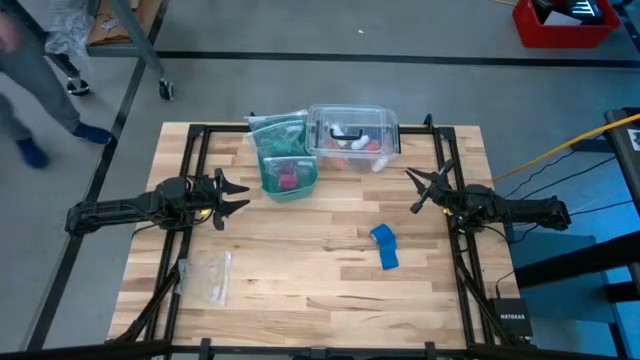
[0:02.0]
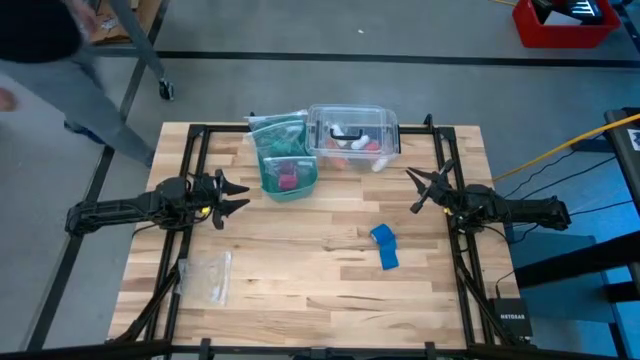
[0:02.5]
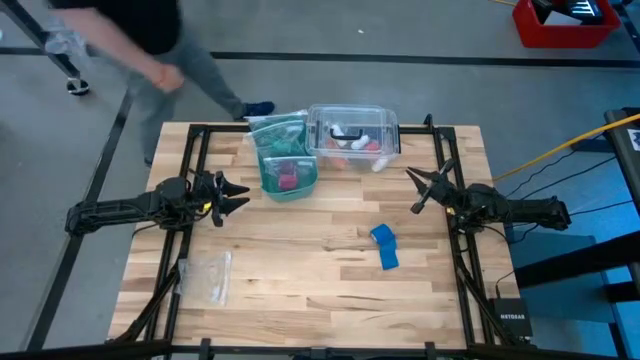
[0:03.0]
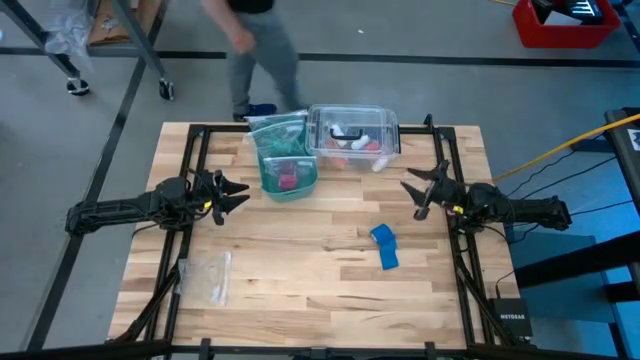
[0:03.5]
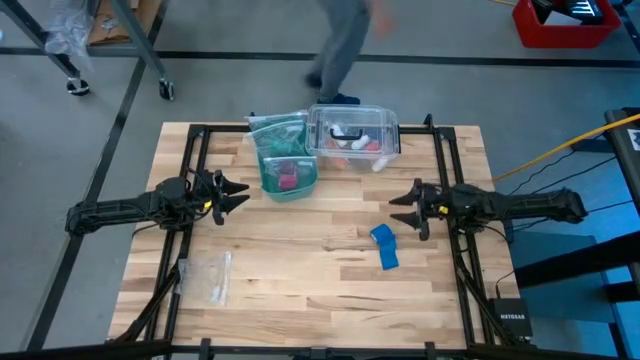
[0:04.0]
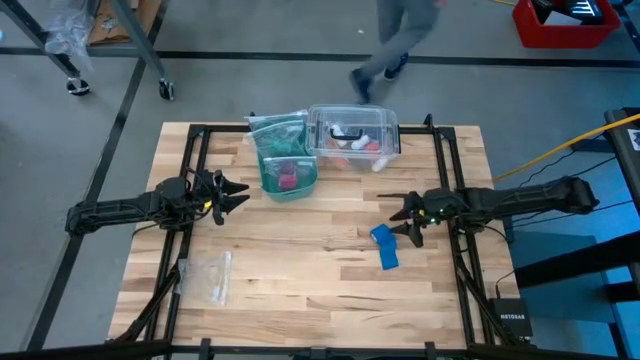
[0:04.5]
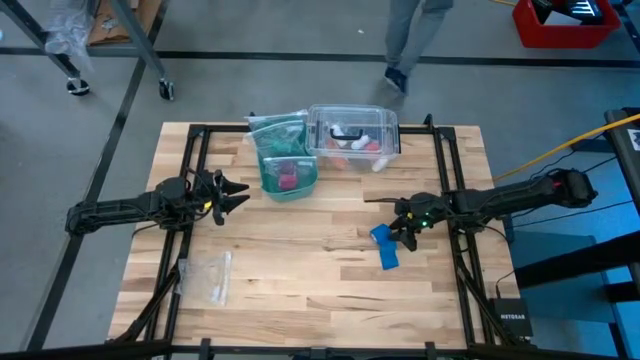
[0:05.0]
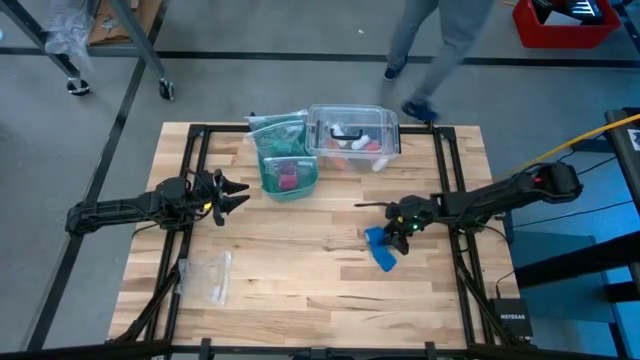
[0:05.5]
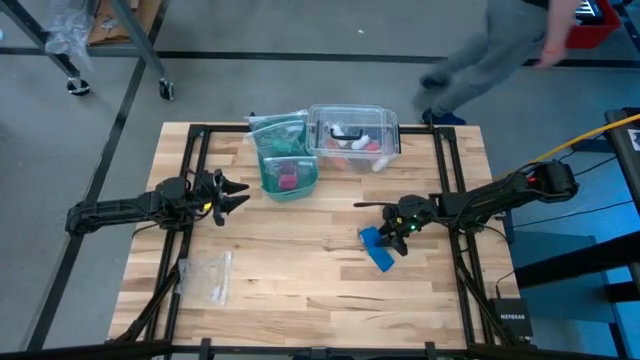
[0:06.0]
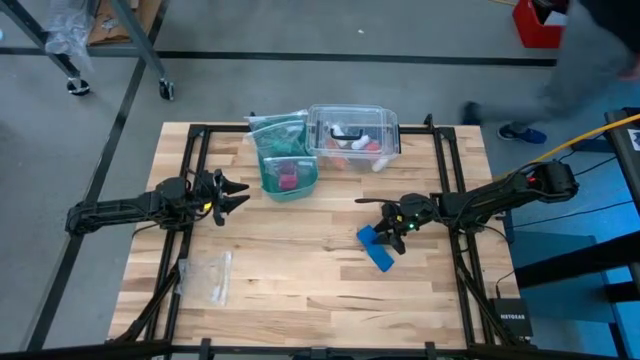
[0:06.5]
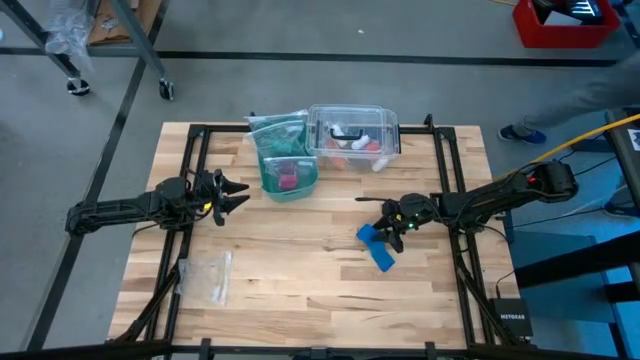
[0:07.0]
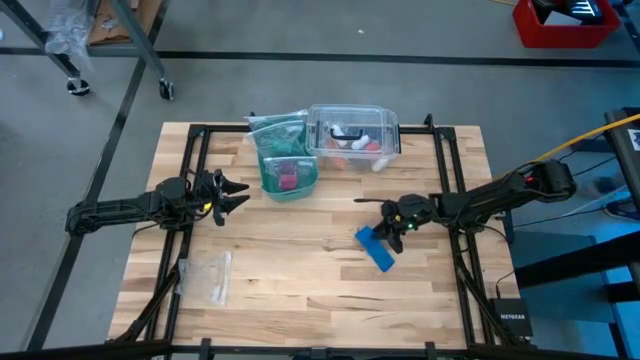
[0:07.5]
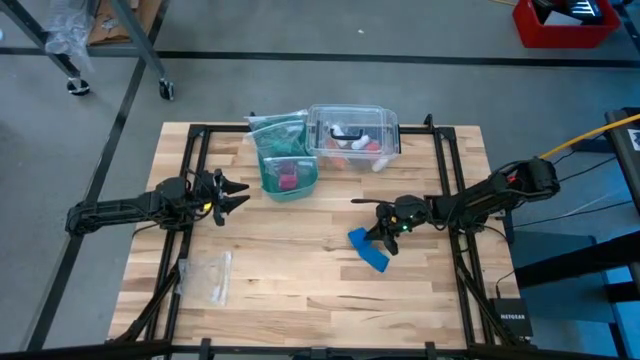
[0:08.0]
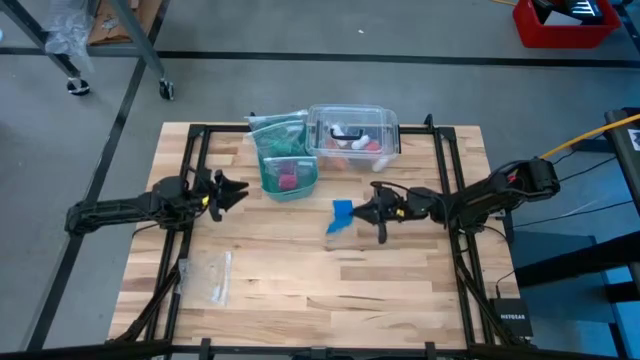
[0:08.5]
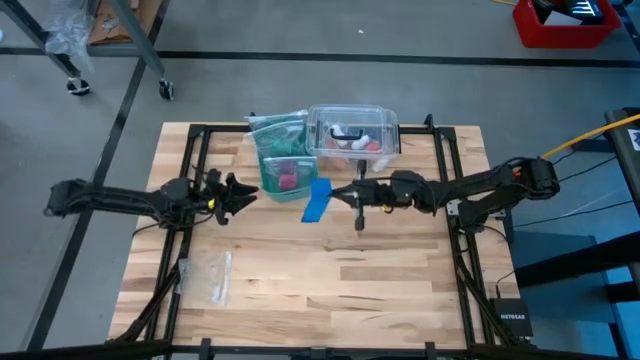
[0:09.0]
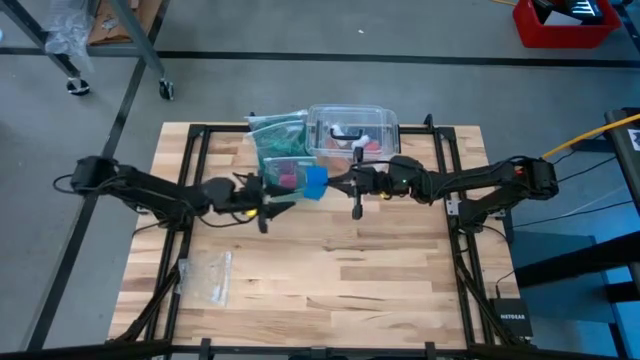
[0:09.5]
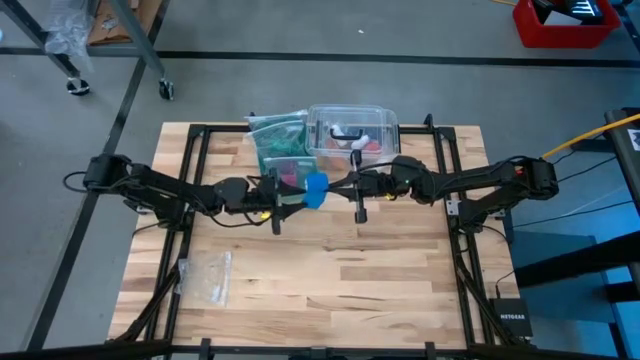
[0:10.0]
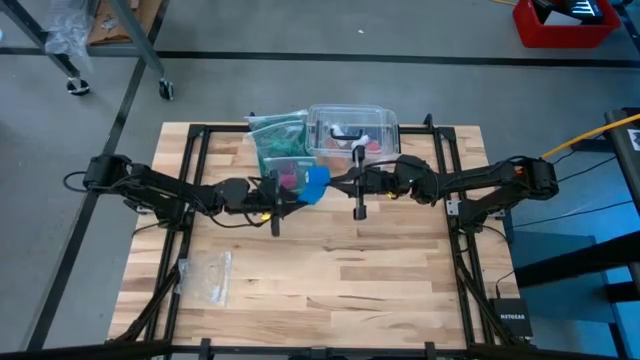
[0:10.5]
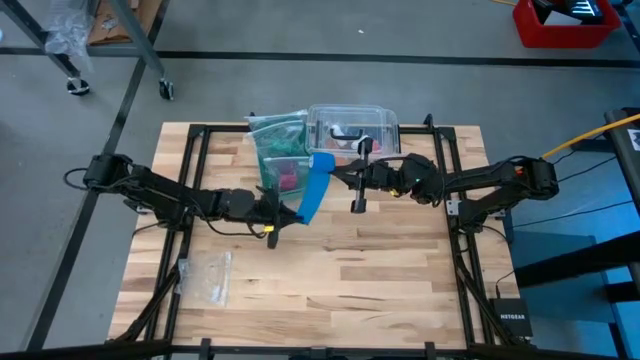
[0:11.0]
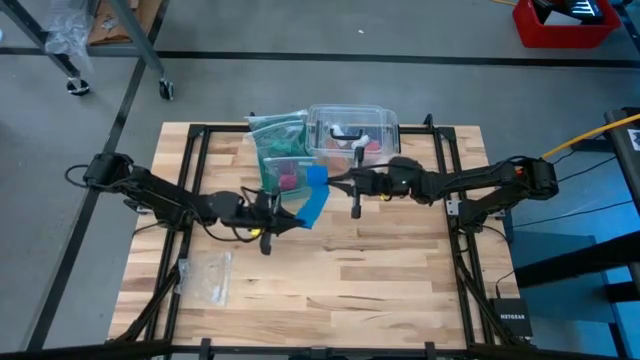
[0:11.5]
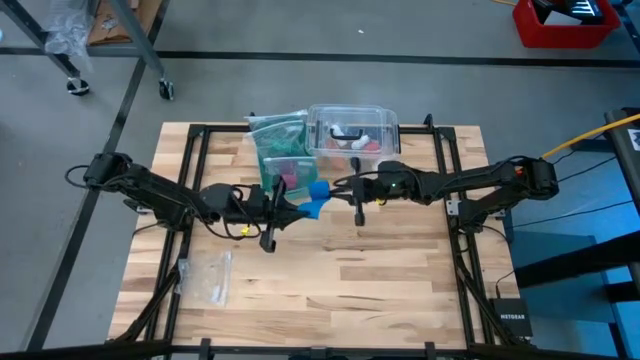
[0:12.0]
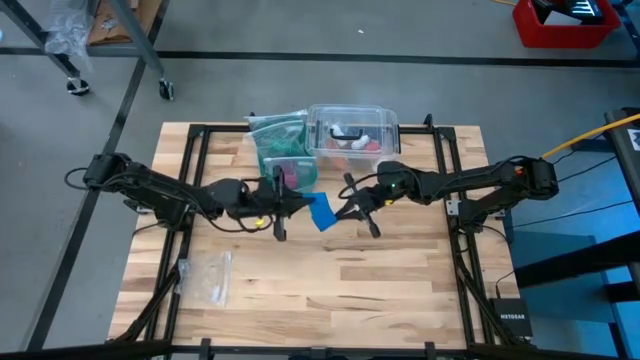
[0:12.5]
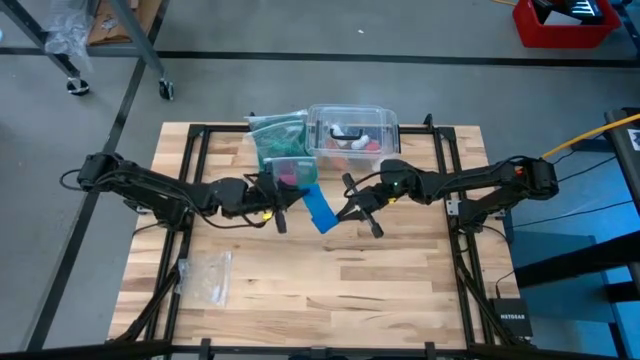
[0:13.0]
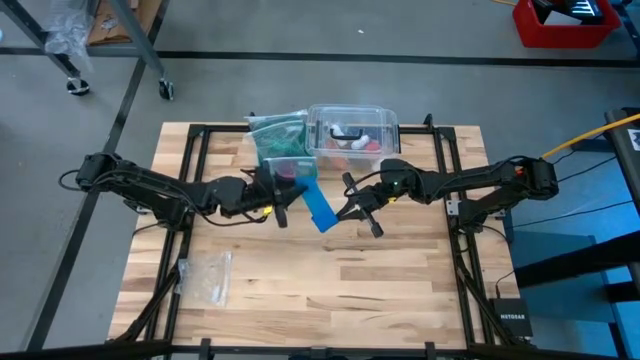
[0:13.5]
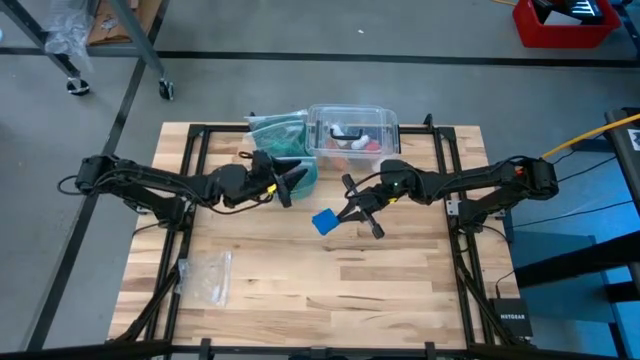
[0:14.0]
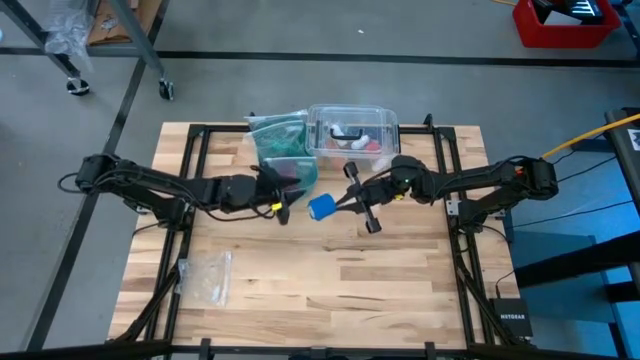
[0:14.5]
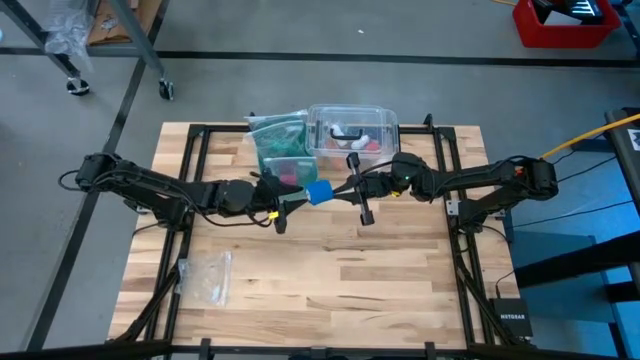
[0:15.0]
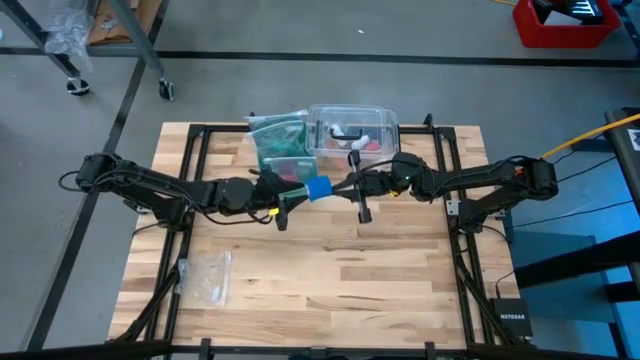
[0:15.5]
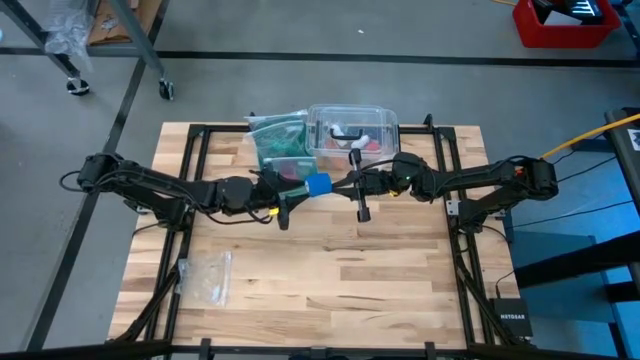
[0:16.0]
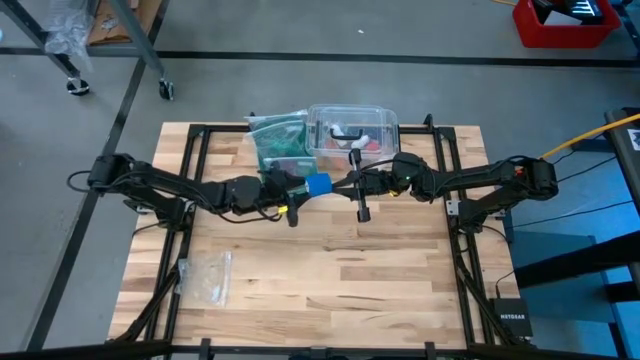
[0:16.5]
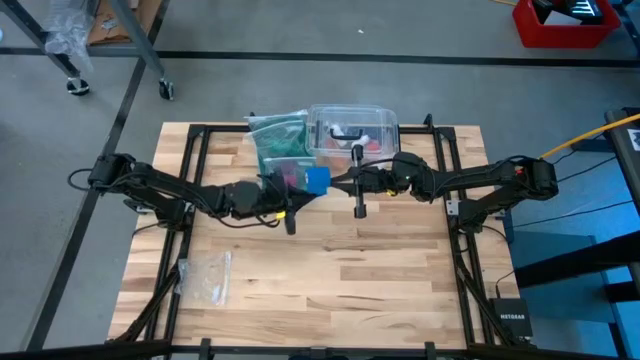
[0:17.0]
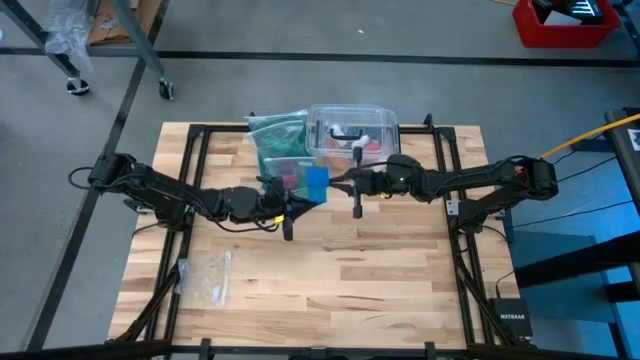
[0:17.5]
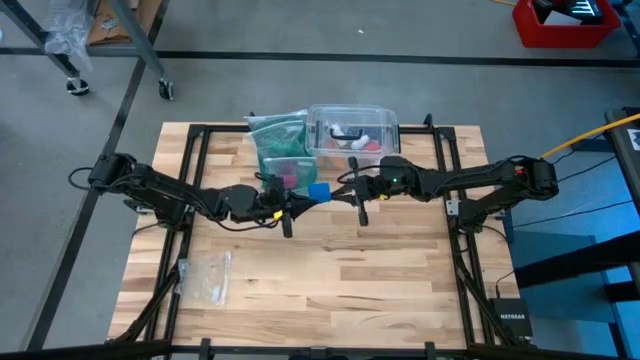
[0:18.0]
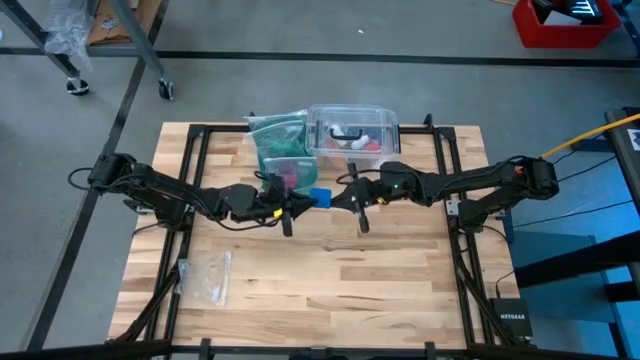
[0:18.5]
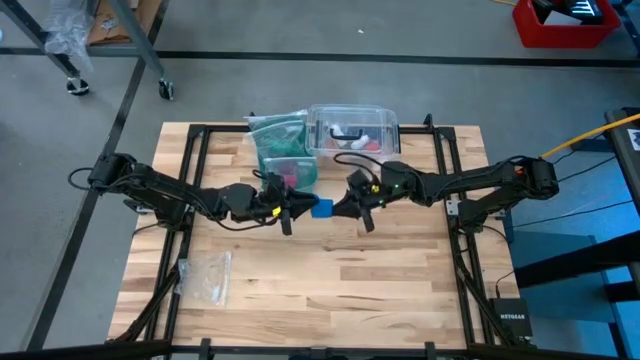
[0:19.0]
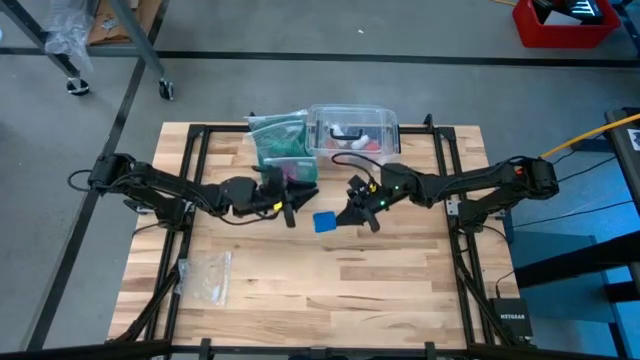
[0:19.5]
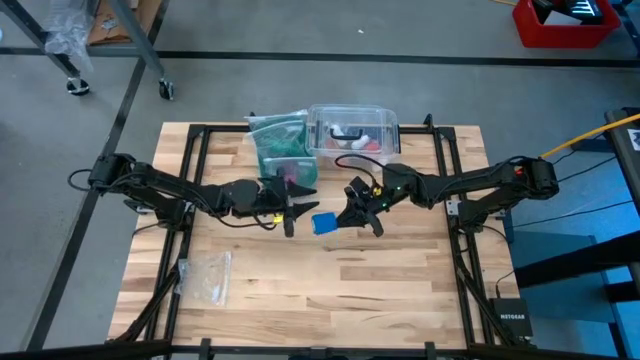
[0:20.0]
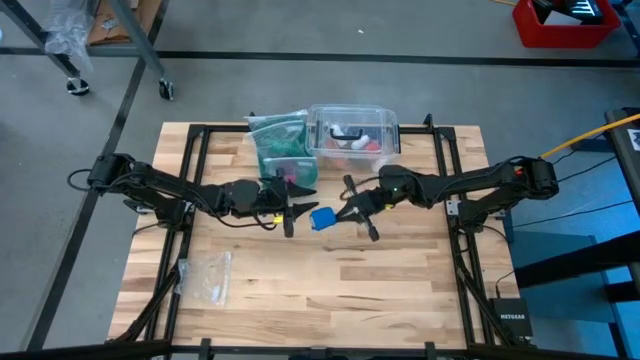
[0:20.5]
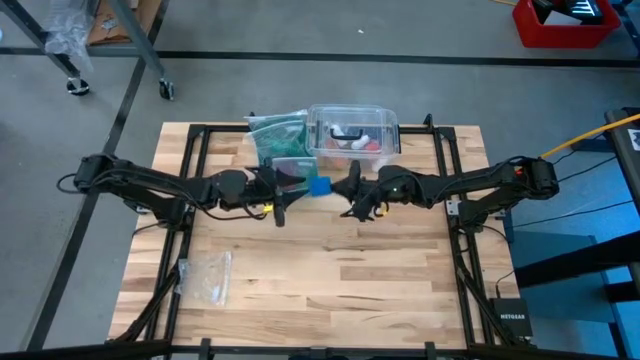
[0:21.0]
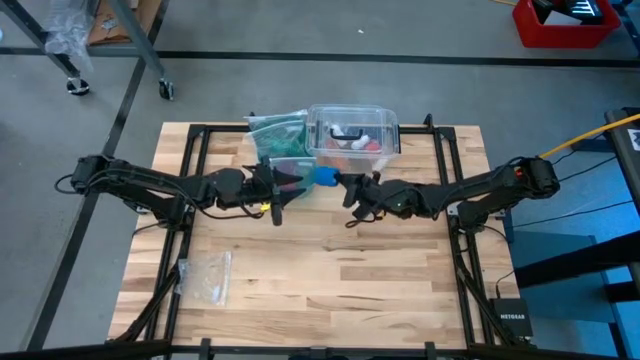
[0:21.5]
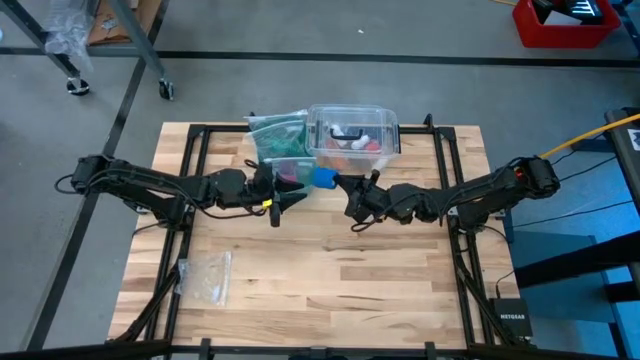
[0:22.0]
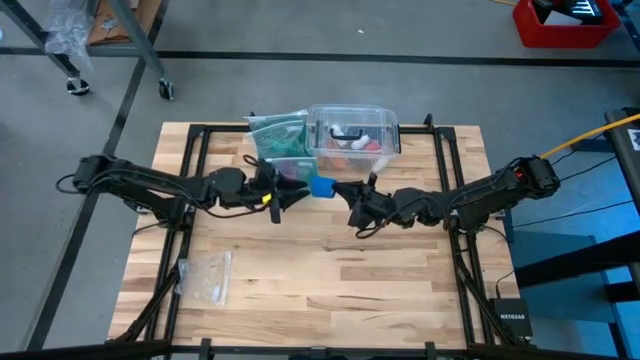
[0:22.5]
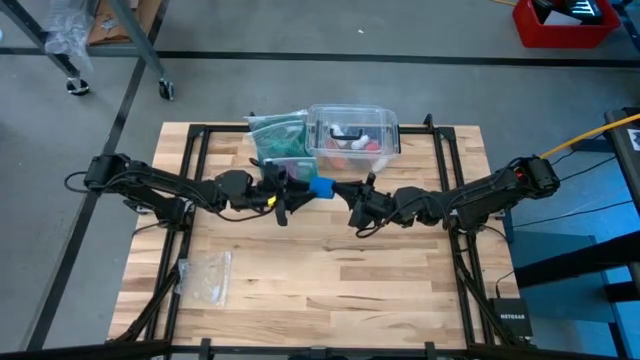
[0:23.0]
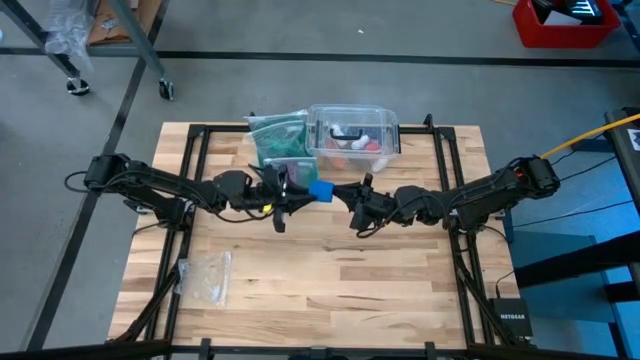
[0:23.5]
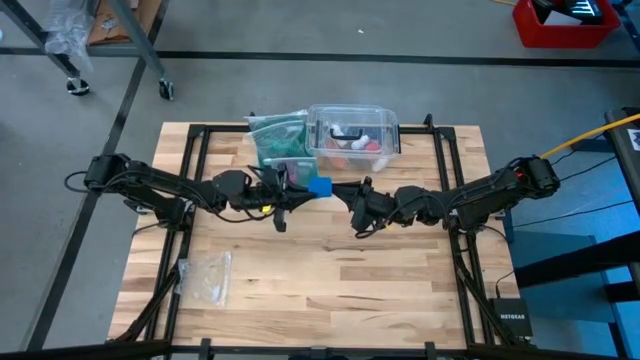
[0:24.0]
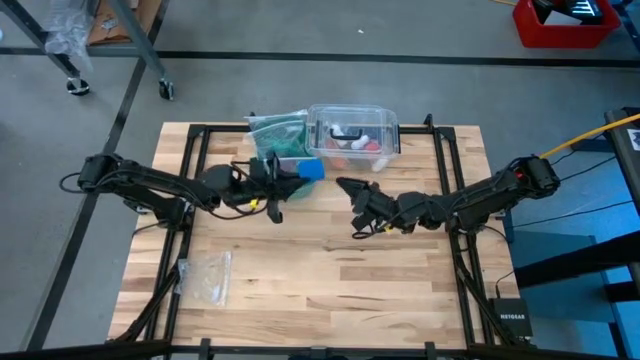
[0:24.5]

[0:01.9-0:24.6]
Task: Roll bandage
Roll the blue bandage on itself
